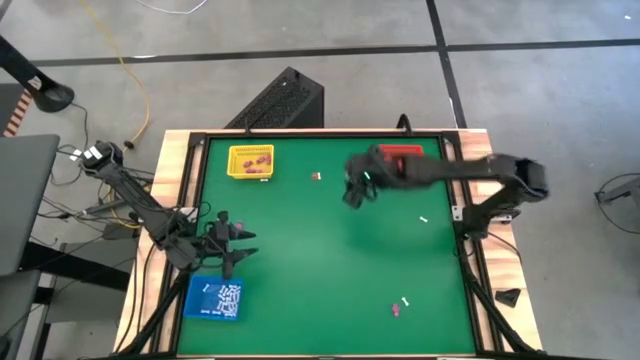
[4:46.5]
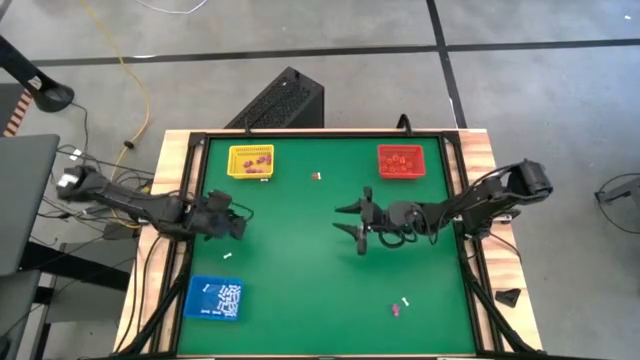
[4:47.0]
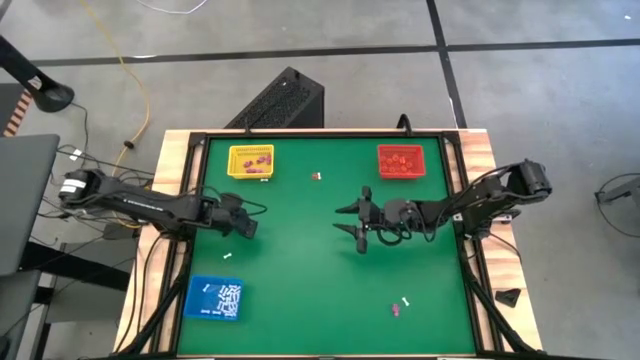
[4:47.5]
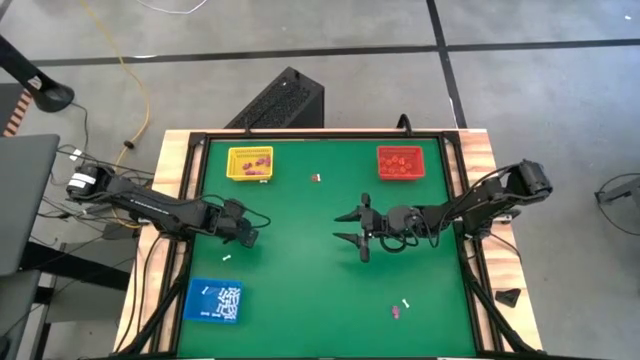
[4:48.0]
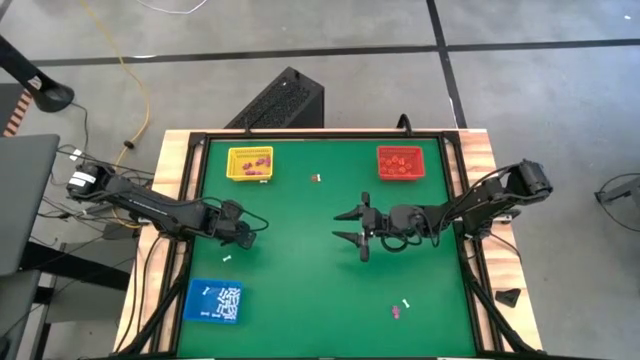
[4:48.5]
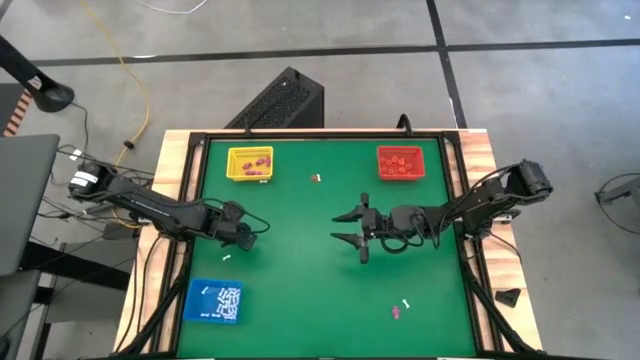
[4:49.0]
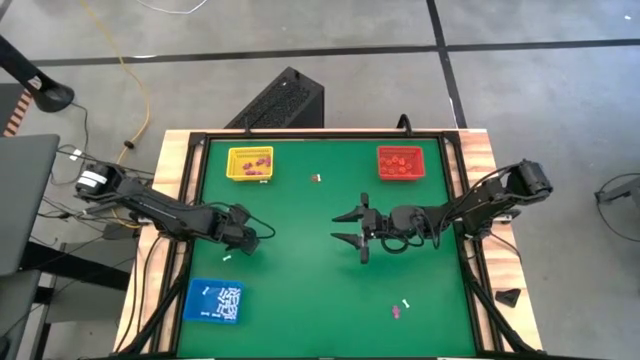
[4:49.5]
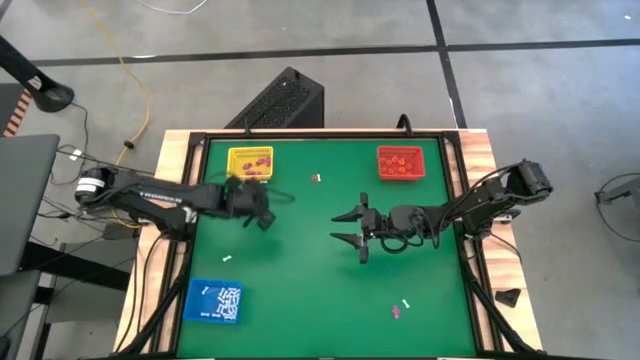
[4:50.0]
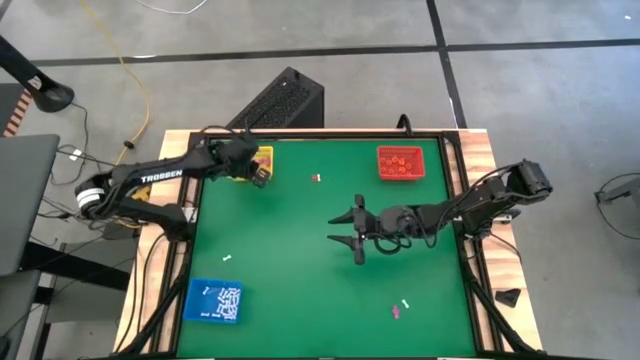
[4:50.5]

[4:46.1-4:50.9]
Task: Sort Halloween decoration
Put the pink skeleton toy into the yellow bin

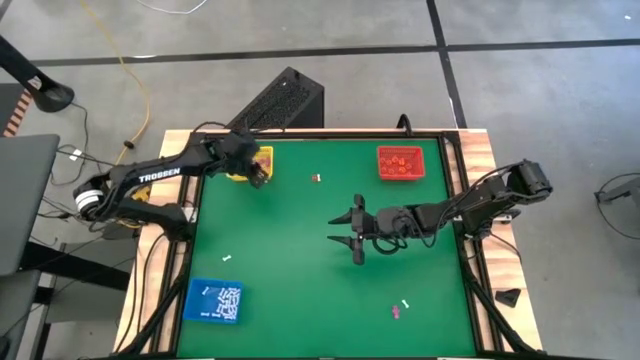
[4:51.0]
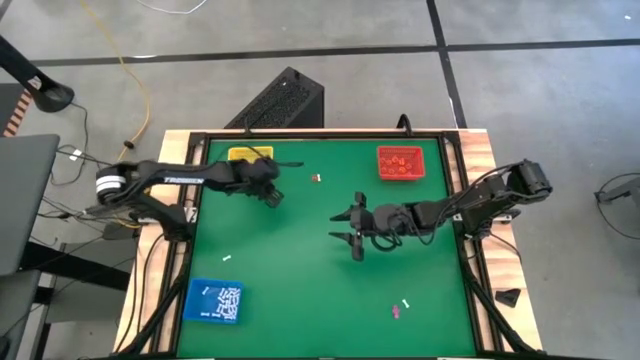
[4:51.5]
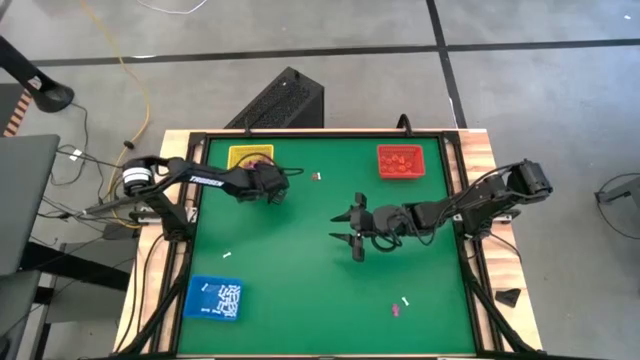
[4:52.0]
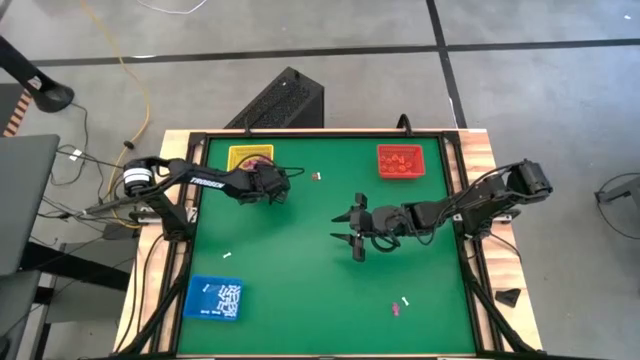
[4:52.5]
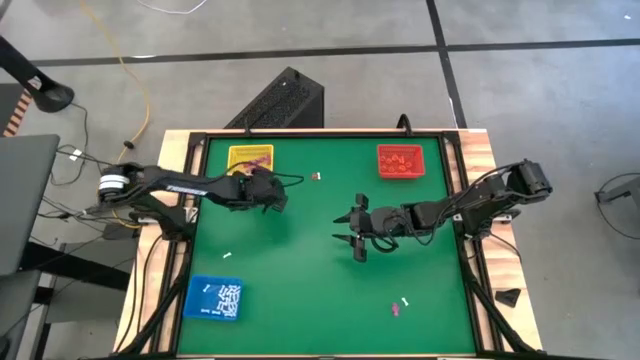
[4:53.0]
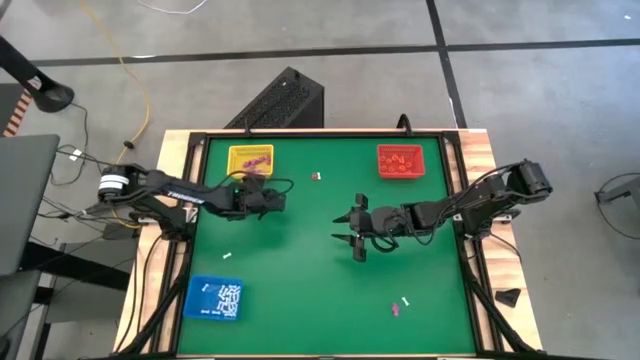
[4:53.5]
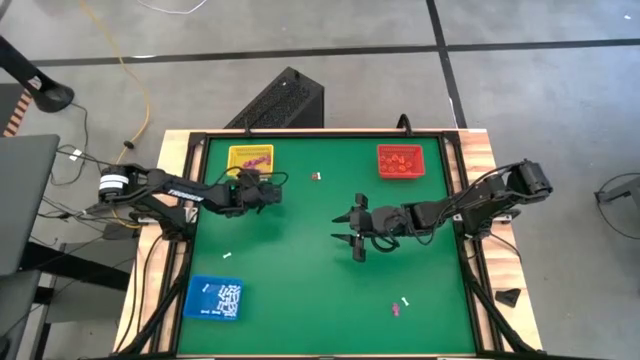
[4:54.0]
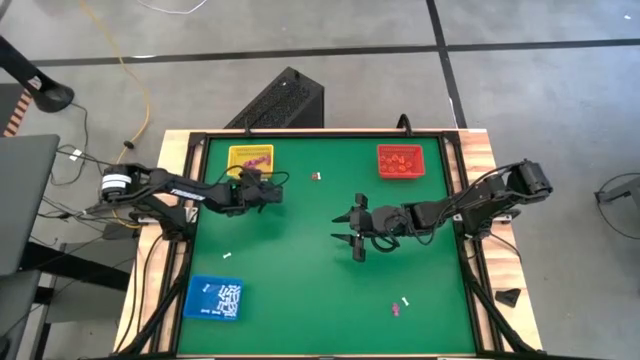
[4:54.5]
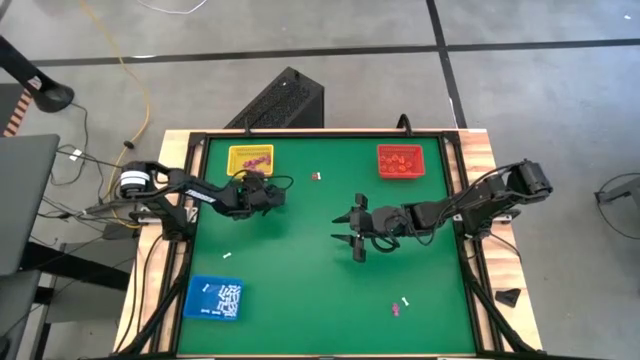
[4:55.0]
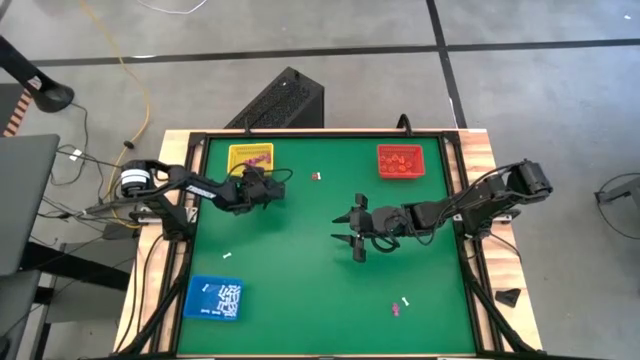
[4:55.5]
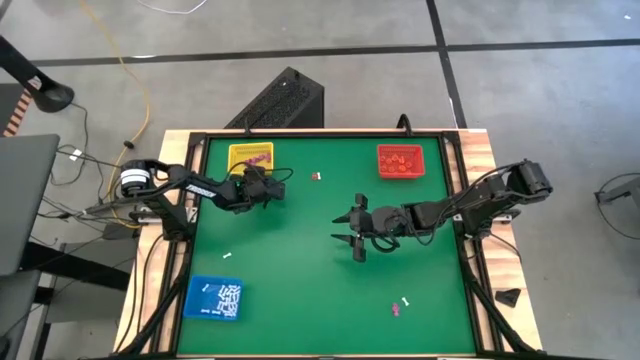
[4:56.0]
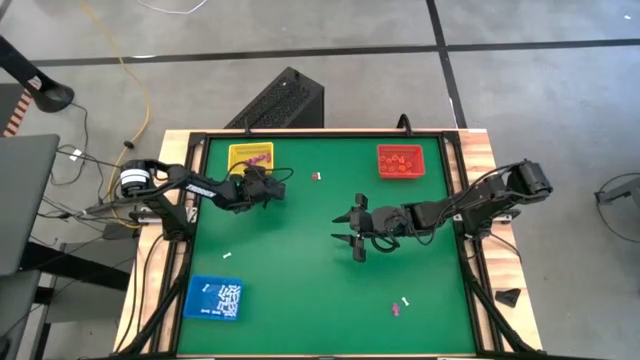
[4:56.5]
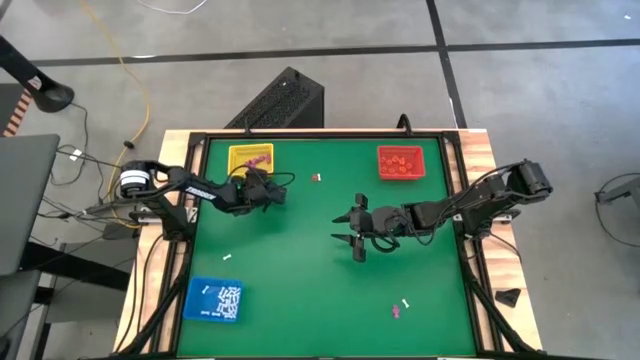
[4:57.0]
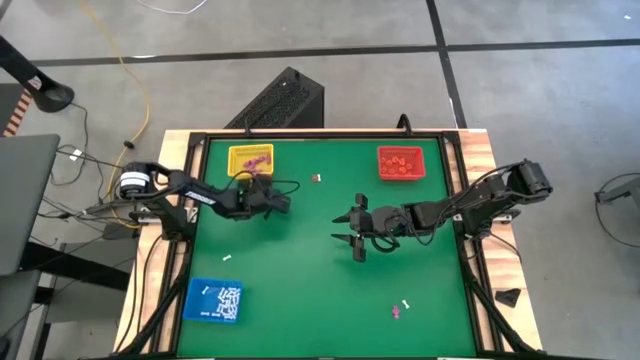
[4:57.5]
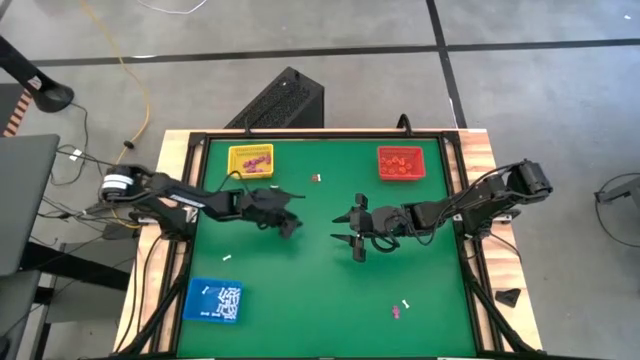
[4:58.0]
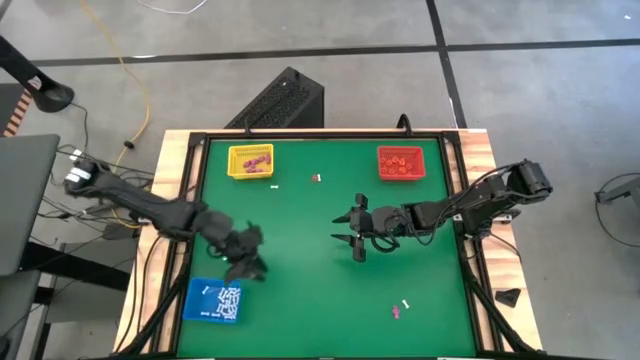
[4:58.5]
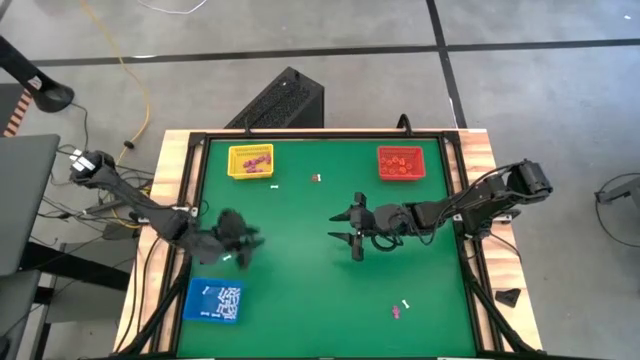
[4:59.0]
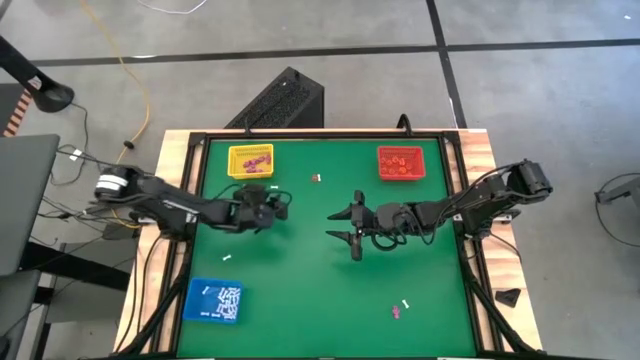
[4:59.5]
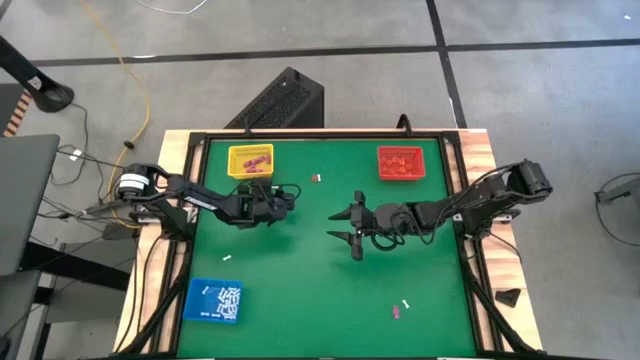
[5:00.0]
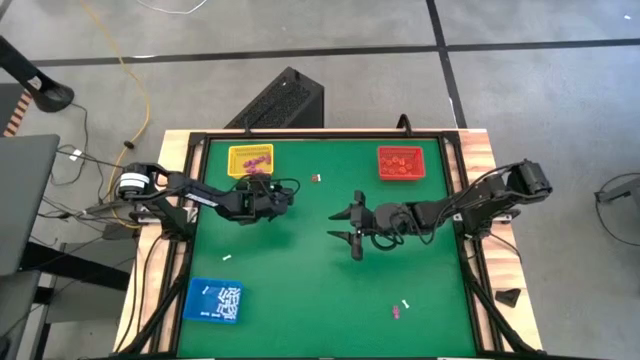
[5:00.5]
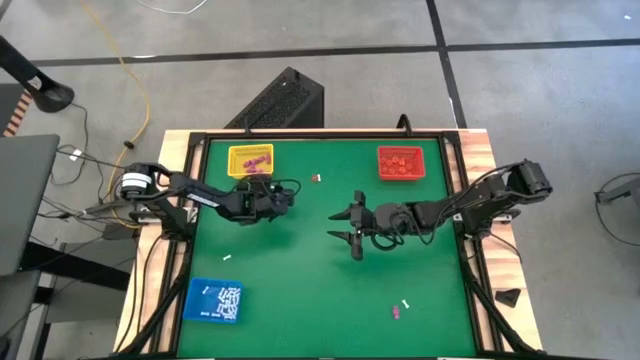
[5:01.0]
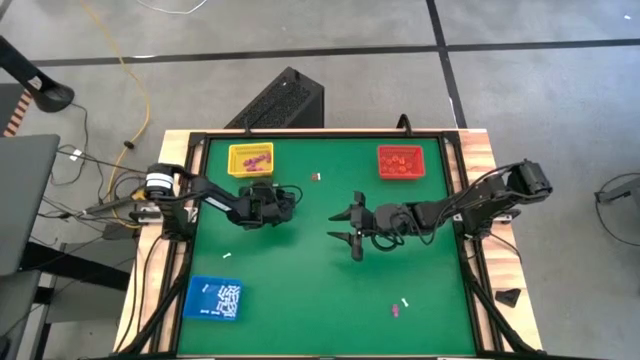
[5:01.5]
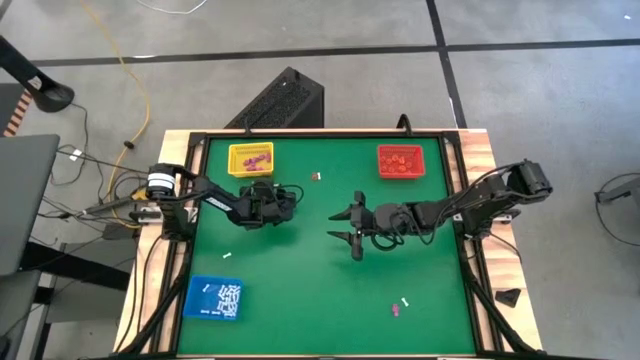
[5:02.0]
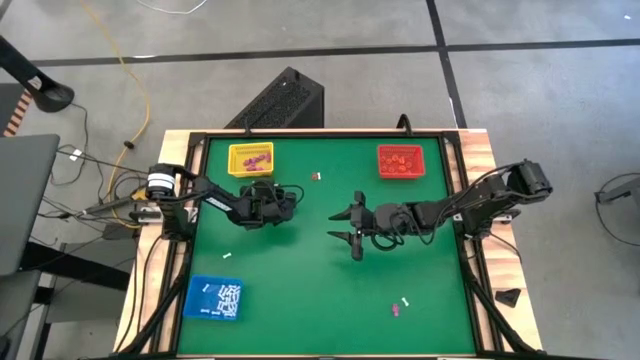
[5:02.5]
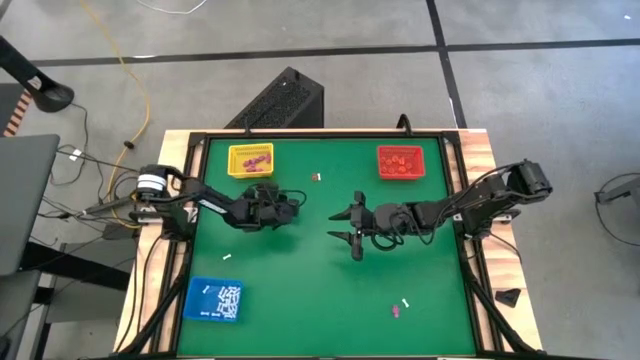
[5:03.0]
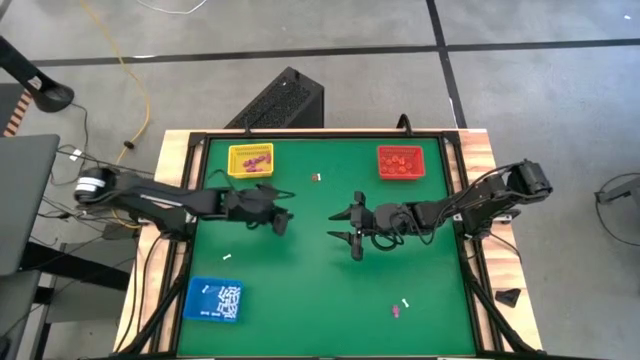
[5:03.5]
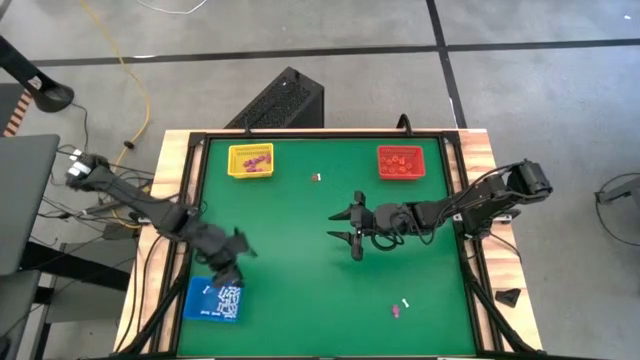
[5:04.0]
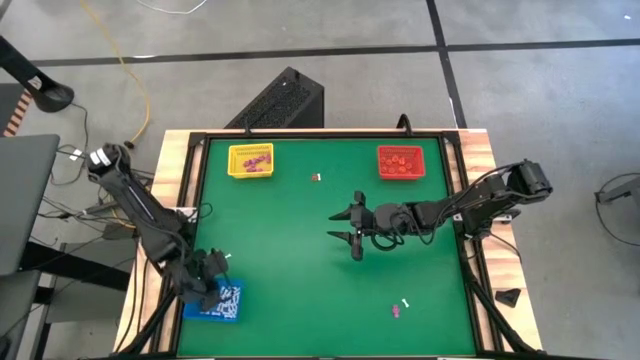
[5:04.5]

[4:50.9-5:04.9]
Put the white bone toy into the blue bin
